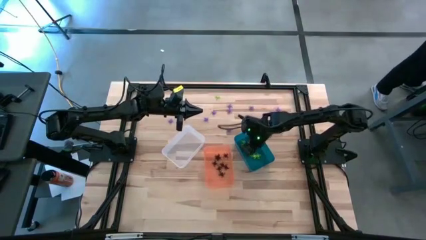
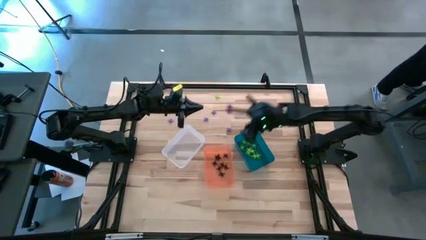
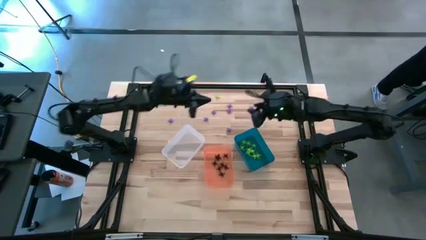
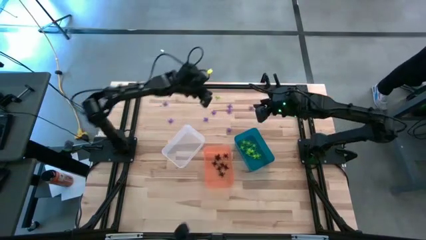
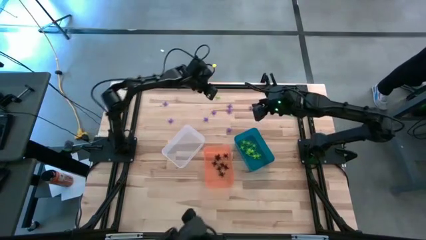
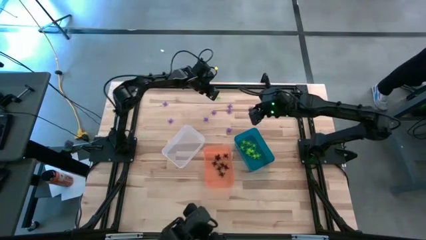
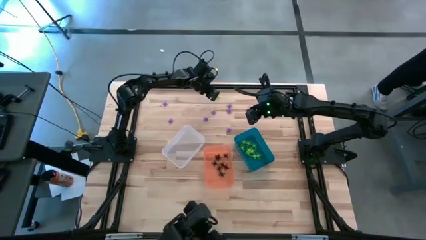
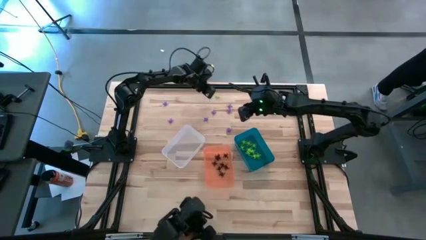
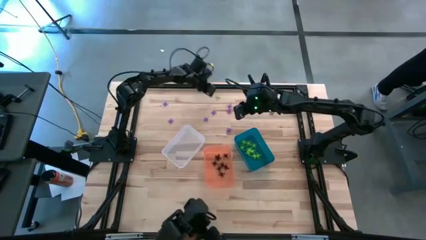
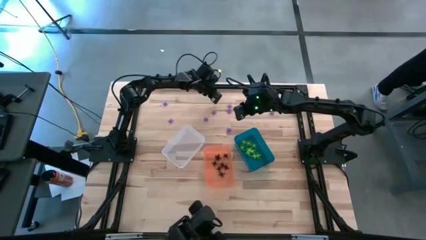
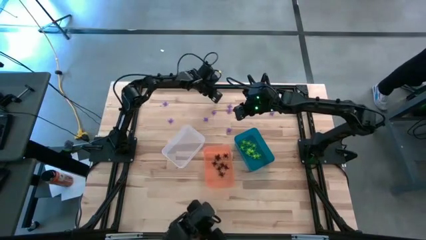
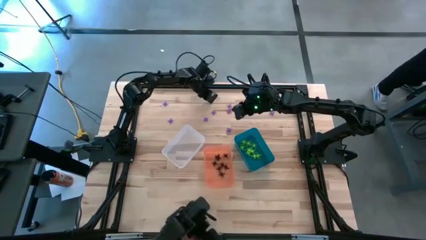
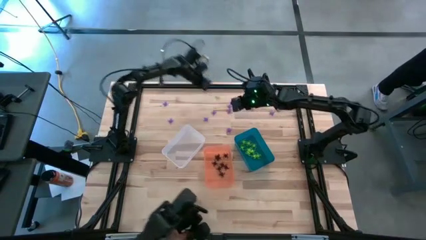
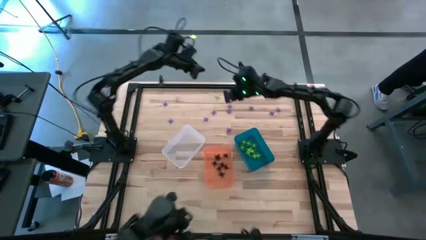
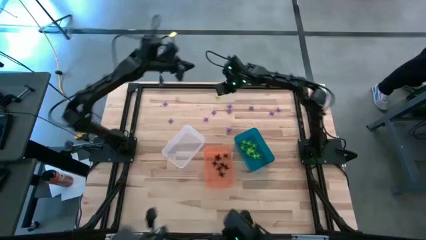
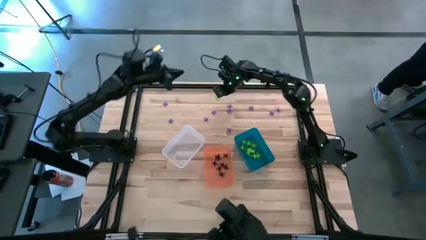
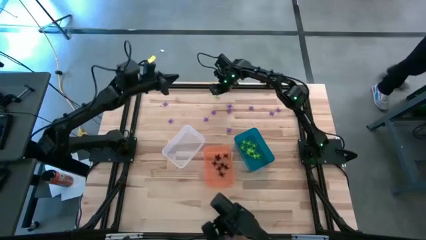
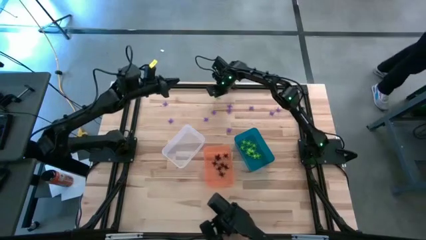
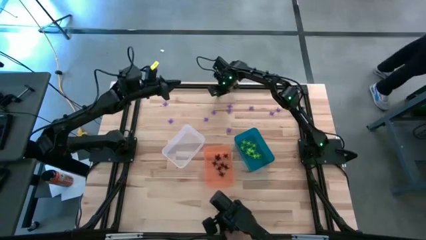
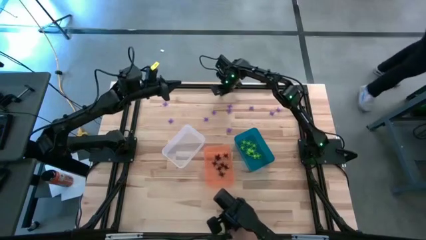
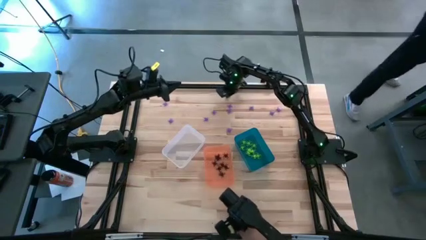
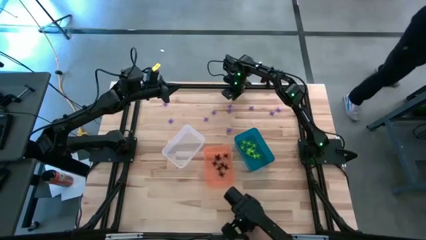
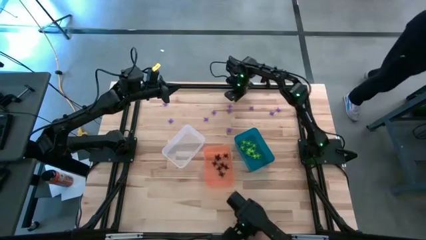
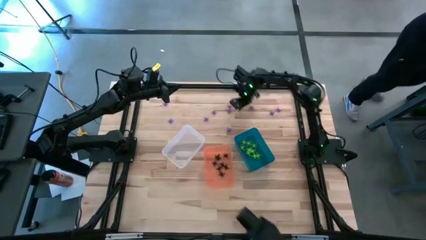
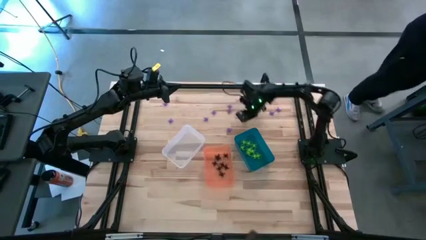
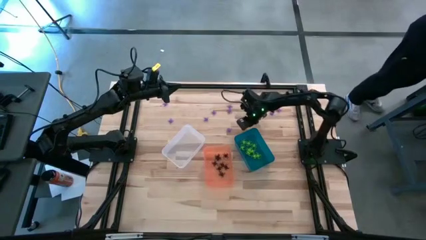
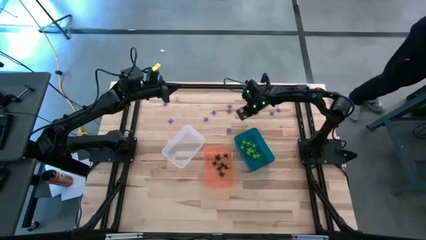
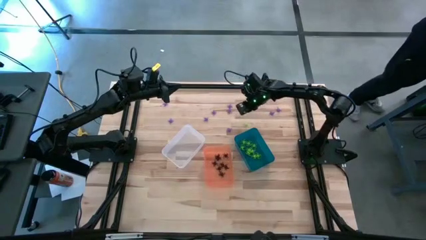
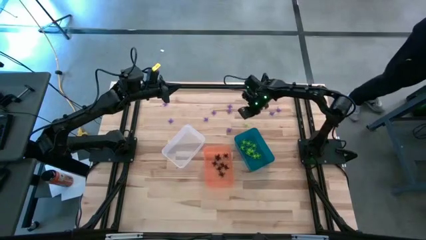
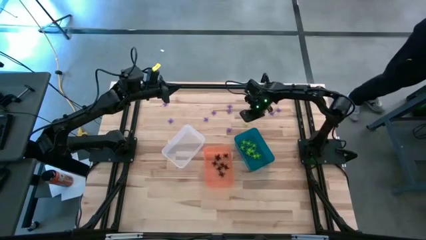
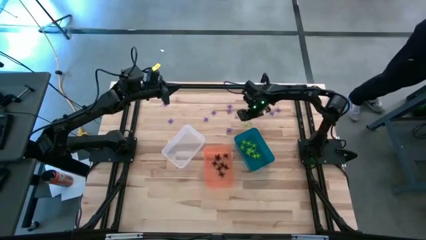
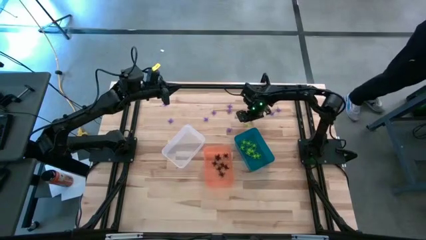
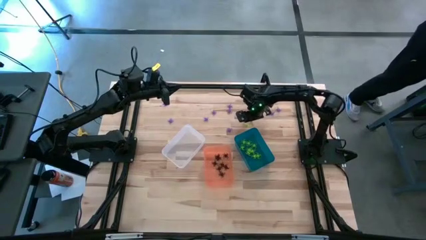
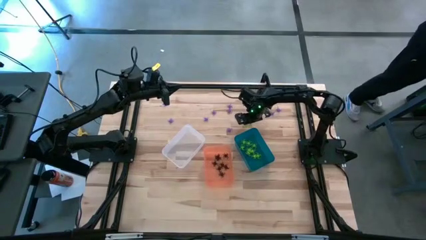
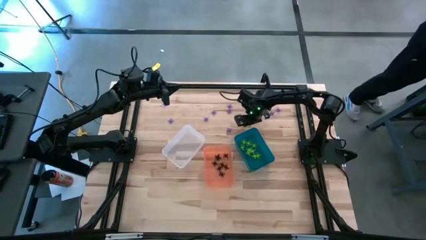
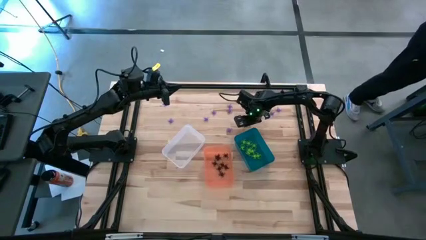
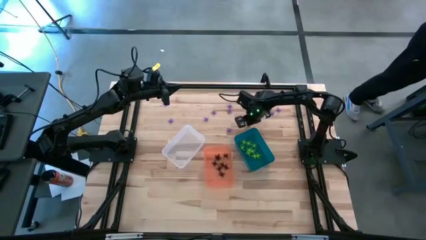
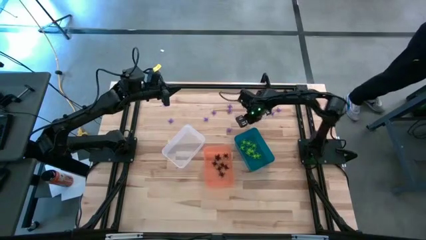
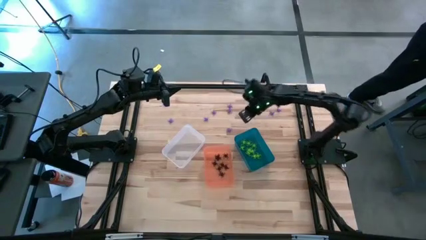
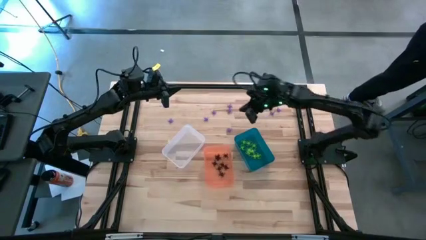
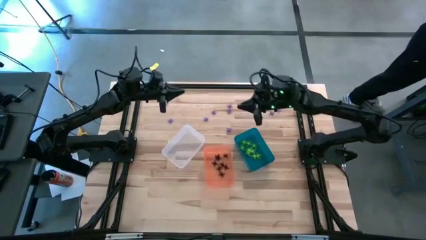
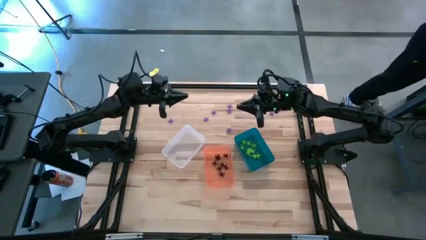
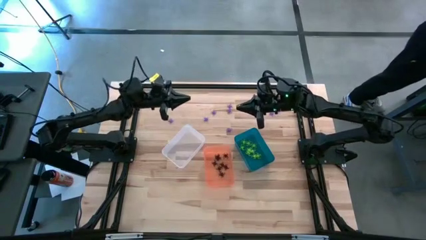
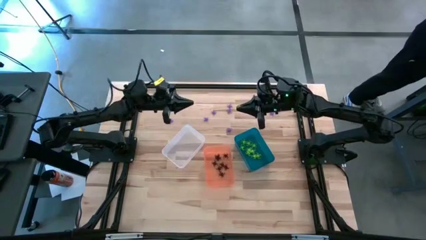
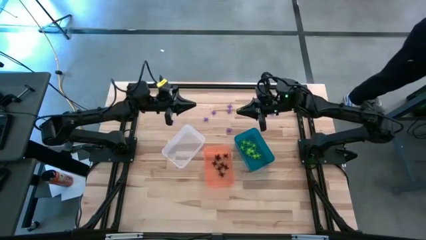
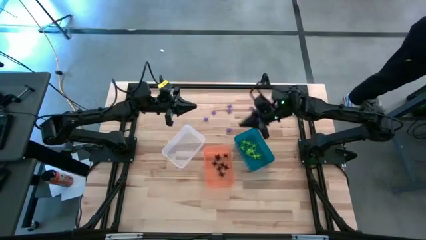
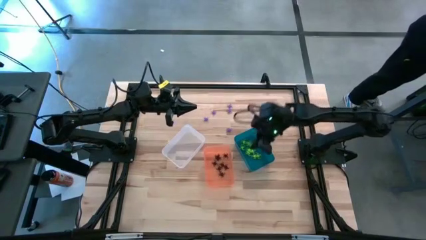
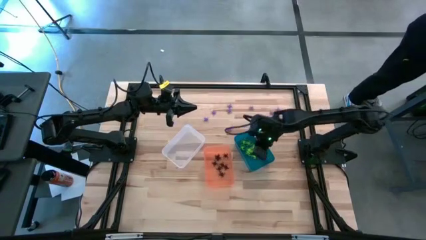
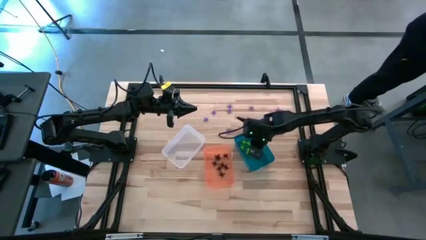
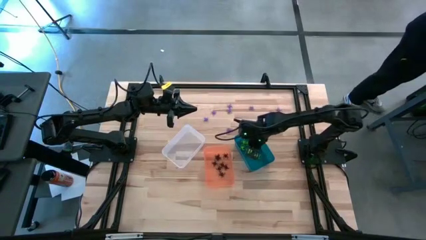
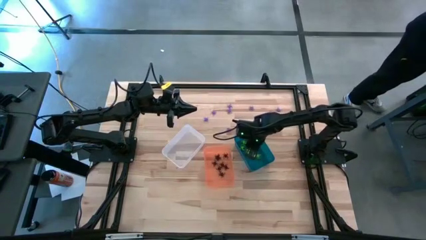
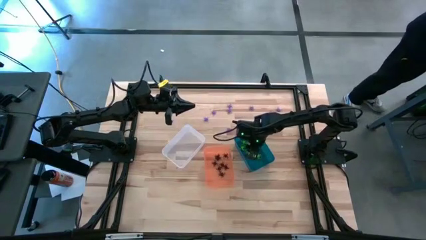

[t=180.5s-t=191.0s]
Task: Sort Halloween decoration
Put the green spider toy into the blue bin

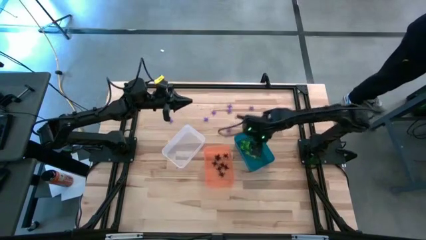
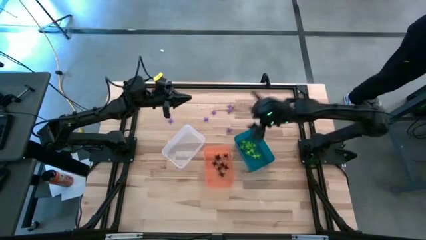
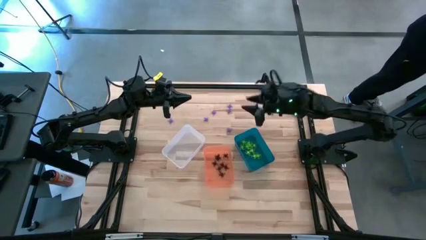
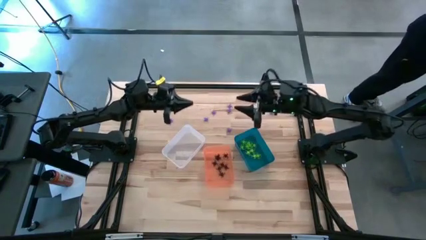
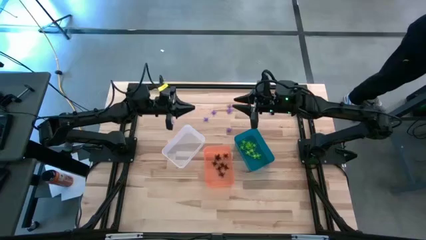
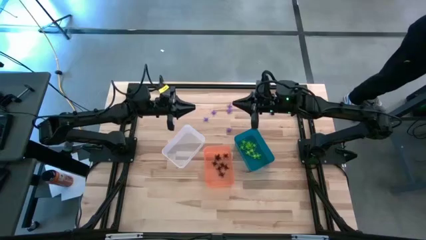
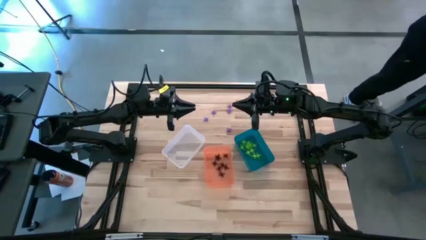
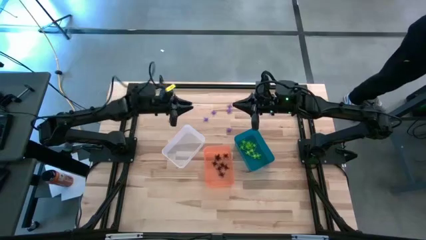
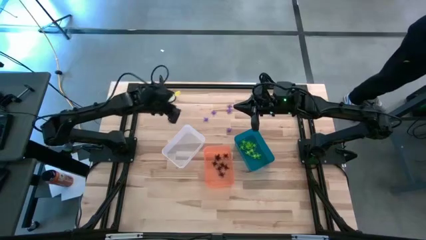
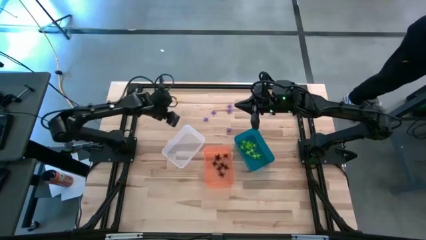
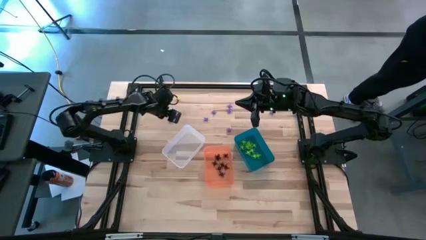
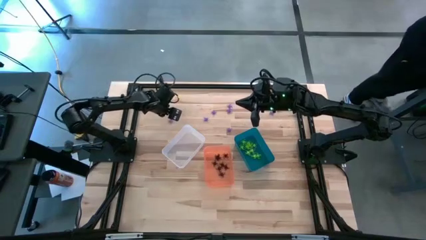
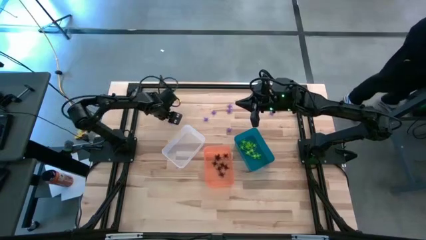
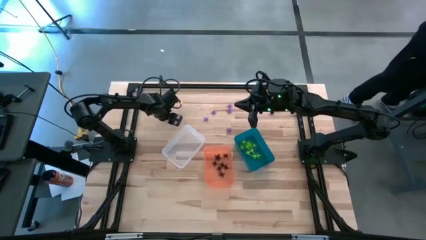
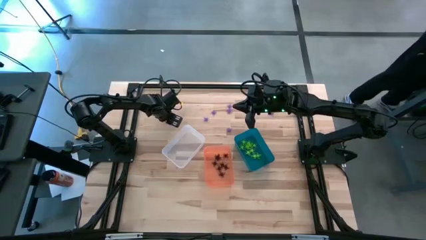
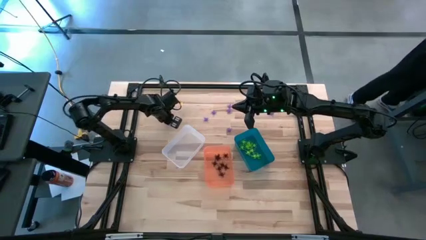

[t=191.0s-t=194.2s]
Put the purple spider toy into the transparent bin

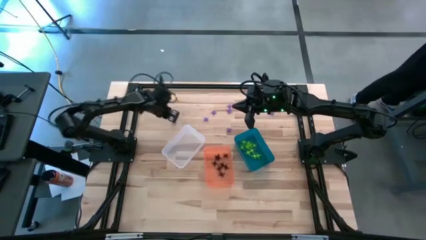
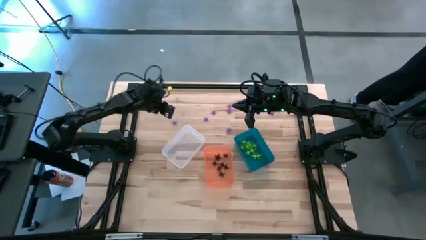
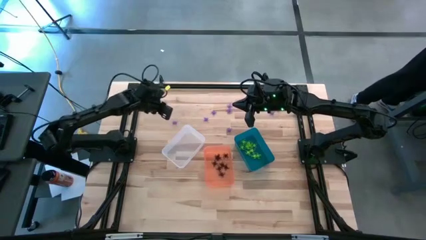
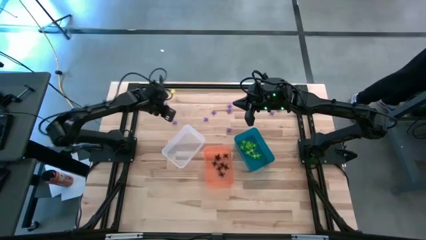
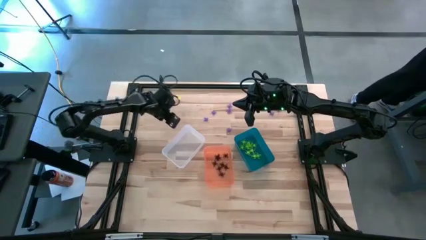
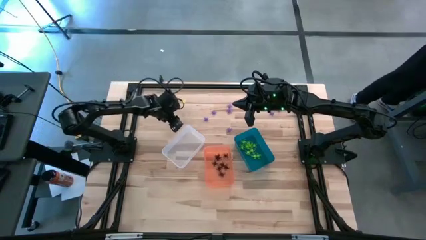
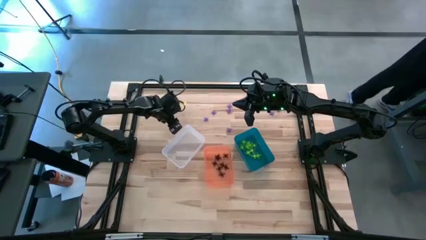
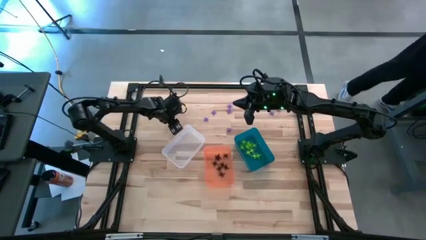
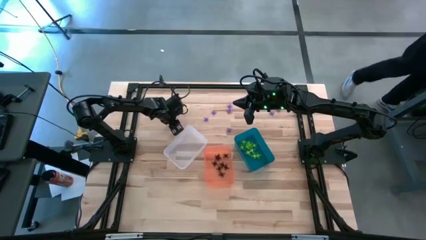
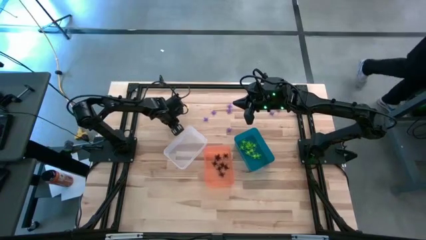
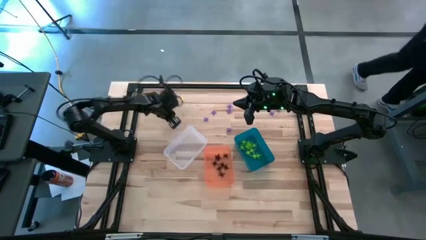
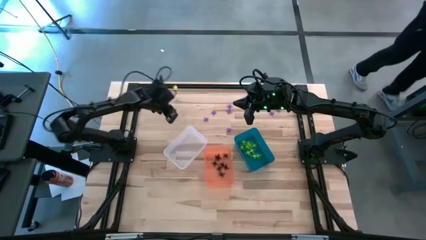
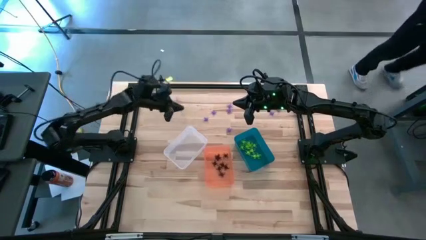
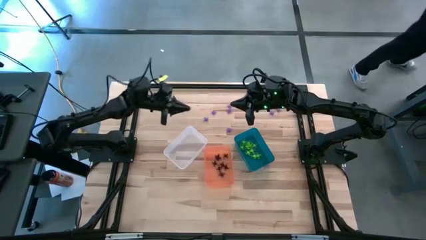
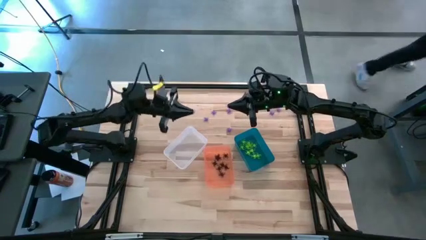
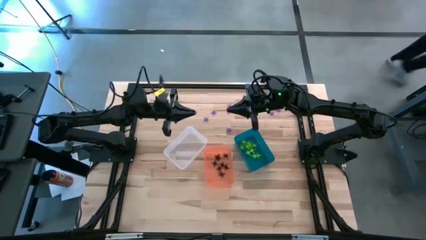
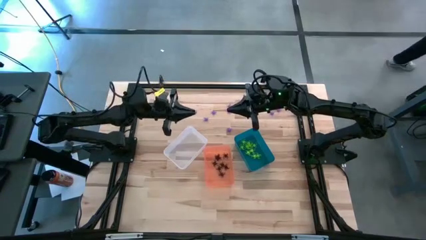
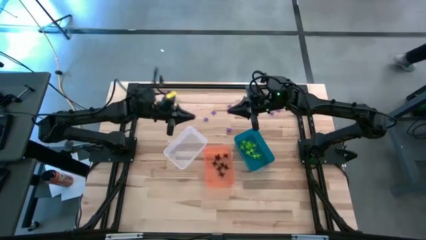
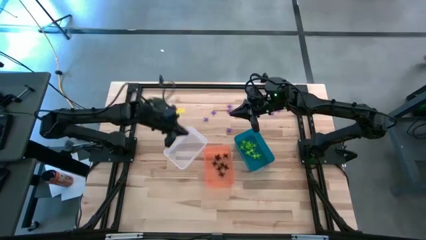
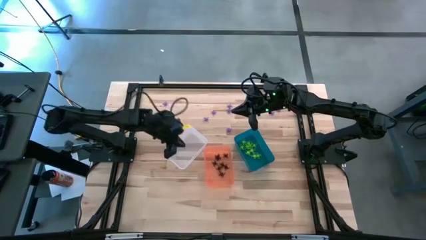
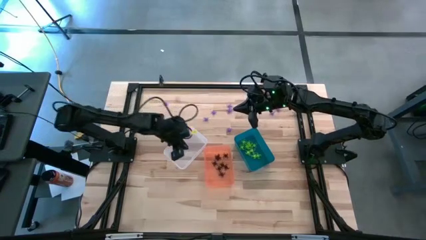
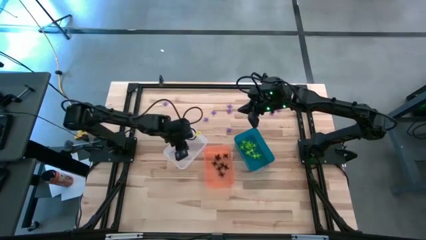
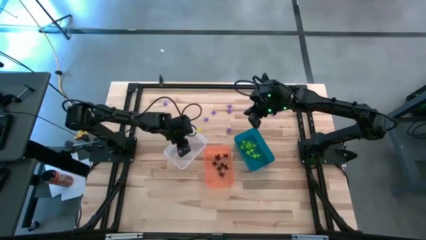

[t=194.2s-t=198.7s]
Put the purple spider toy into the transparent bin
